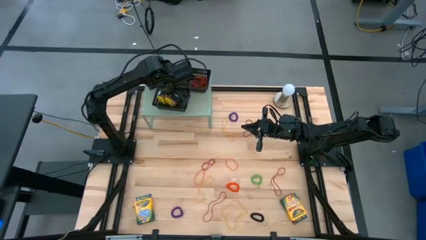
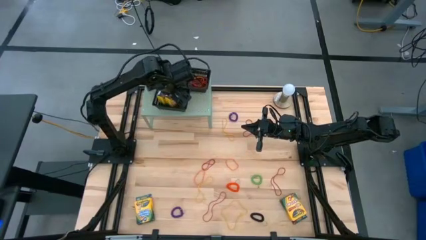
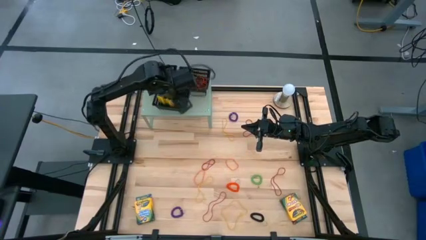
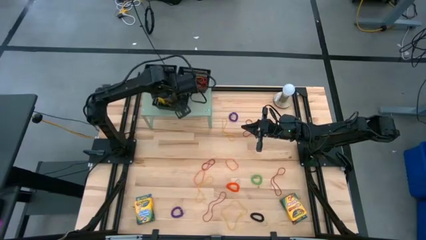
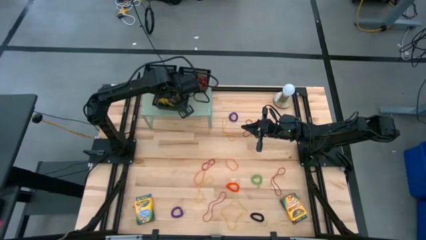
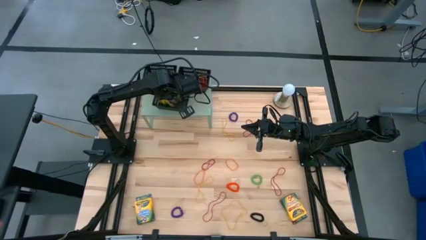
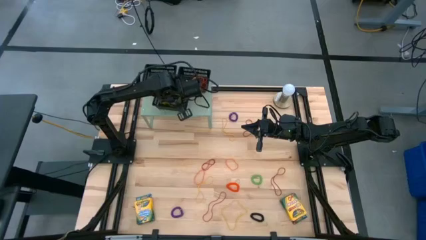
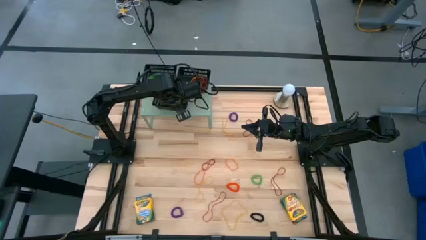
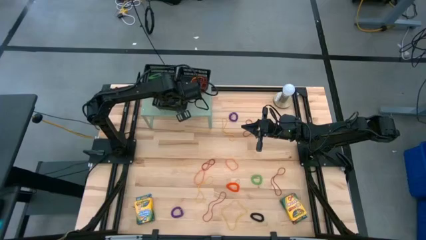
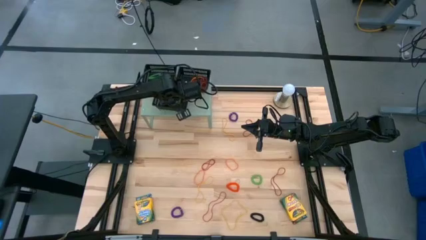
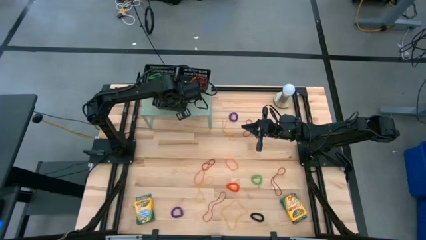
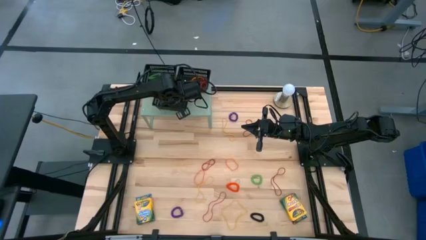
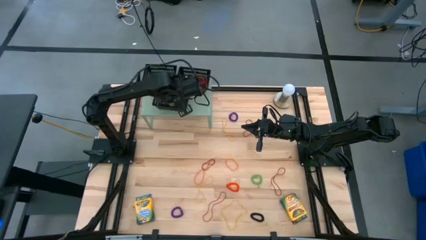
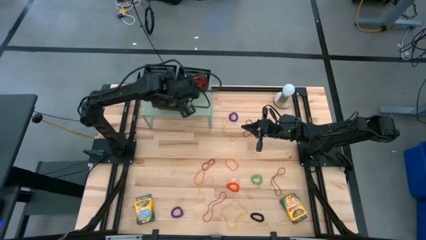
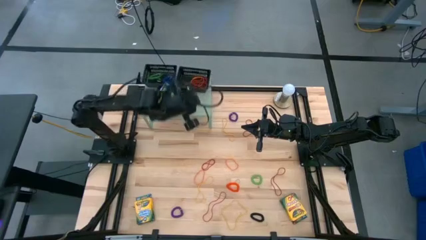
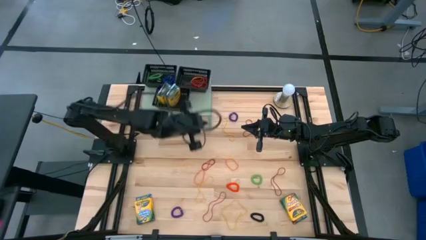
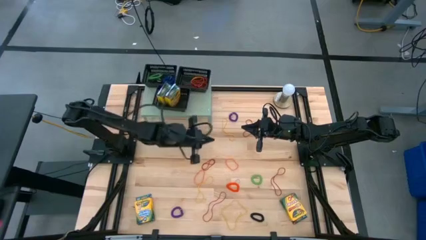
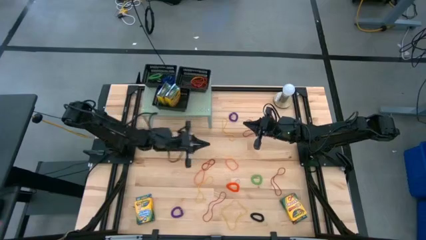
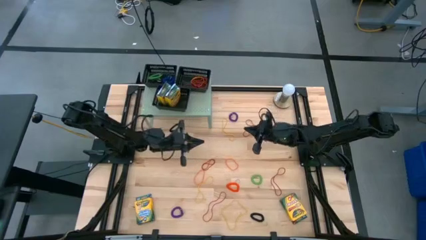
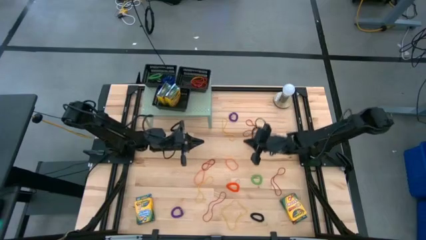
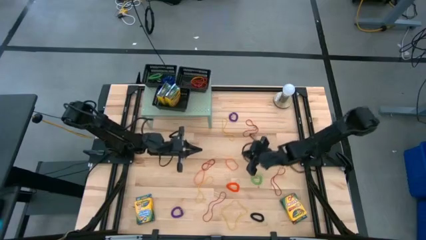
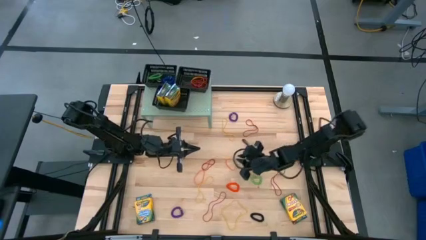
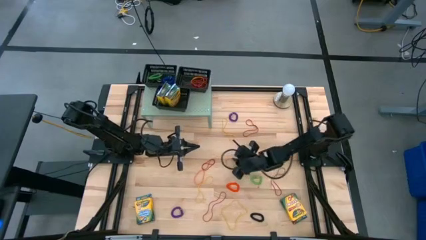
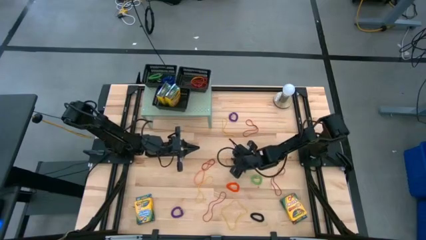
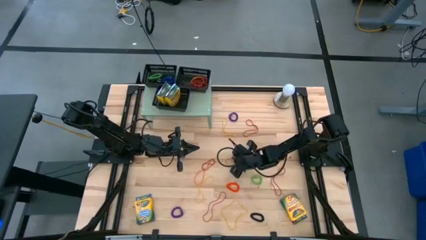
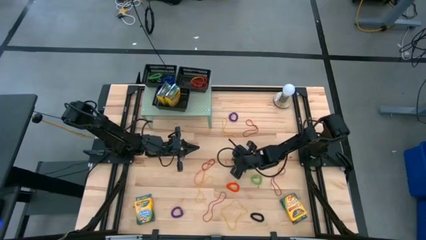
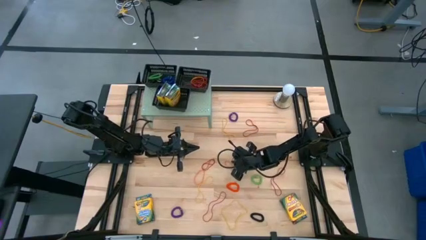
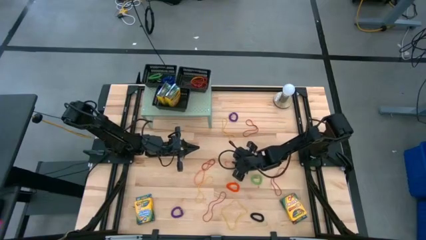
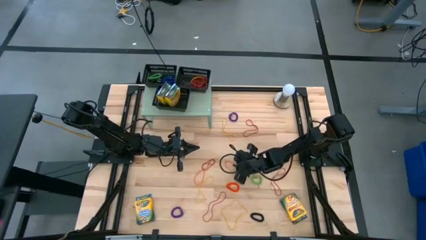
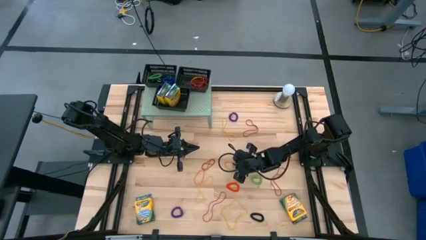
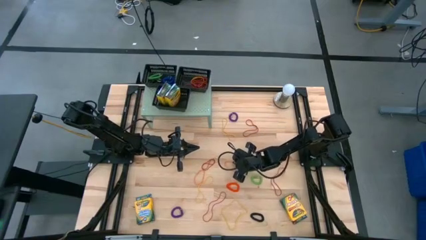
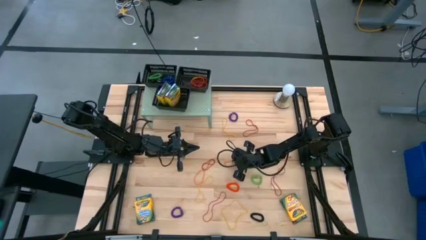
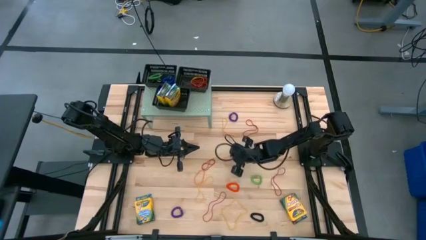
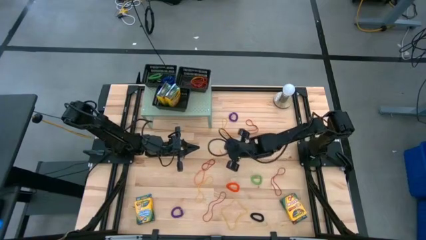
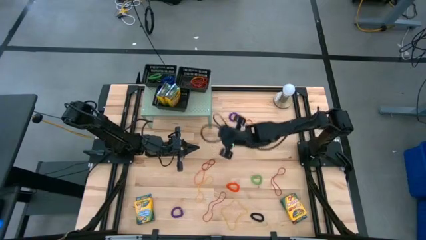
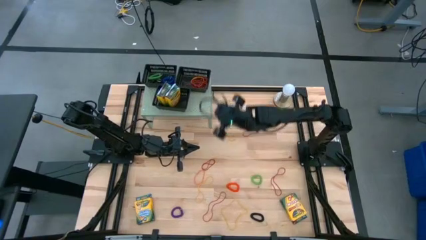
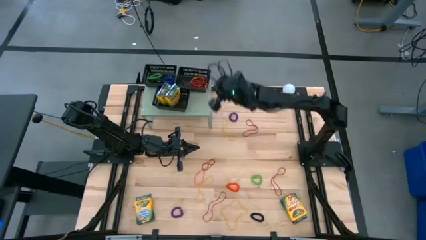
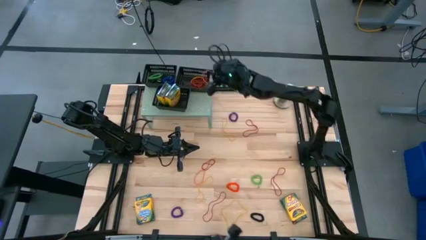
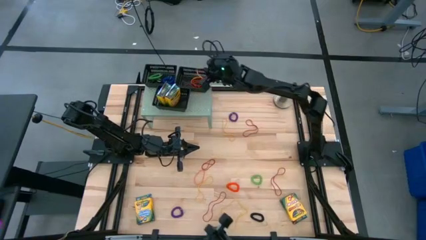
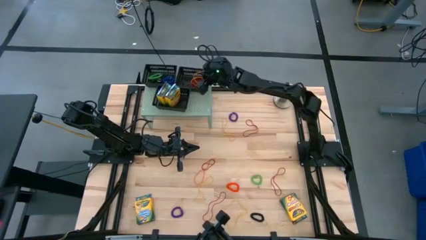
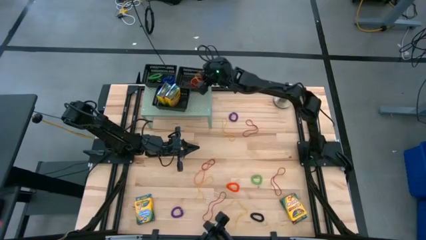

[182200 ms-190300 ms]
Task: Pick & Place Office Desk Supplies
Put the orange rubber band into the top right black bin

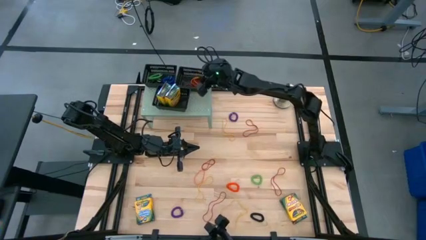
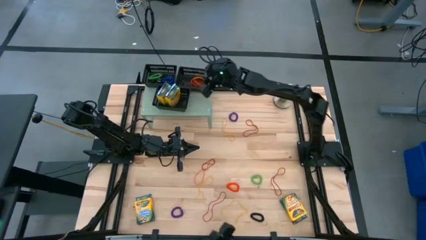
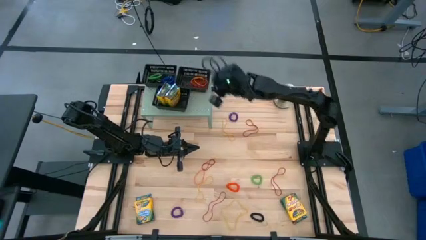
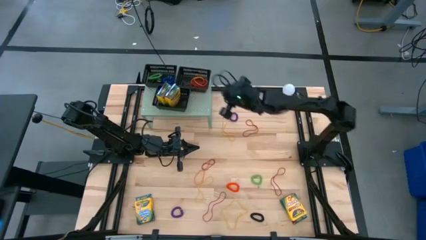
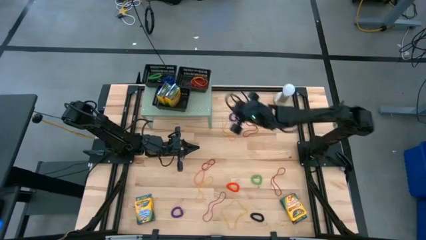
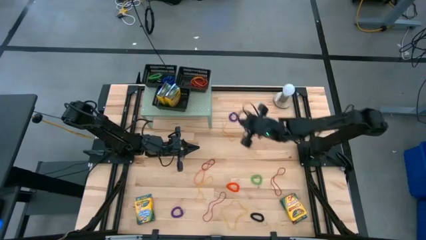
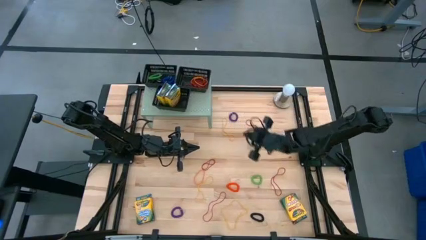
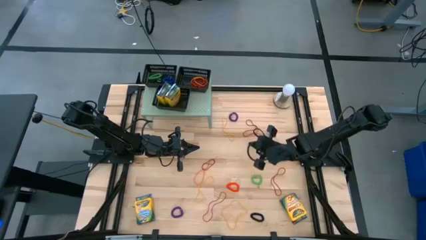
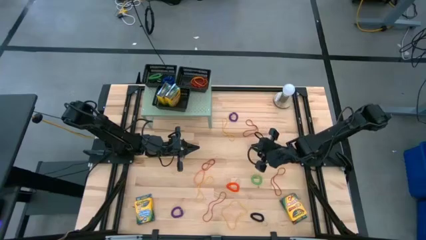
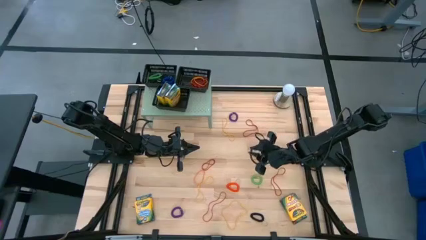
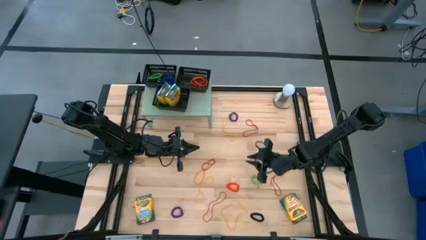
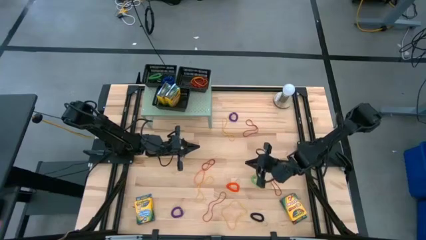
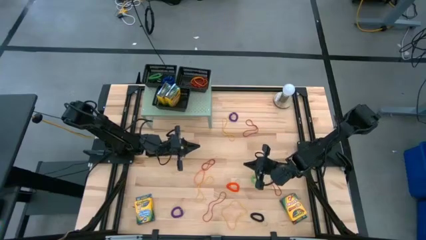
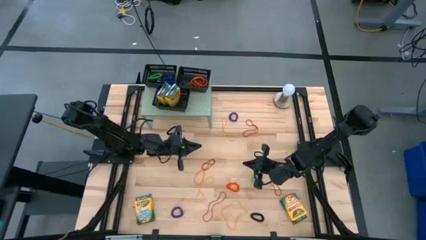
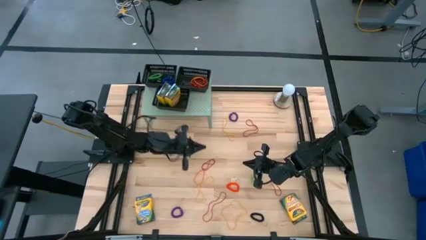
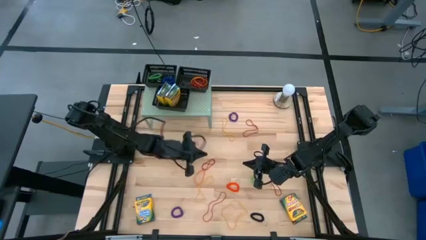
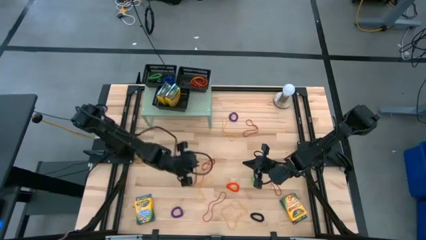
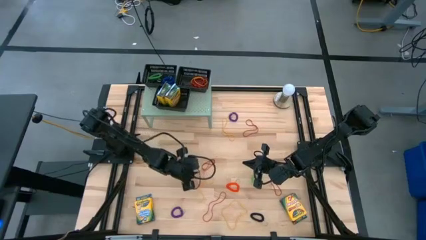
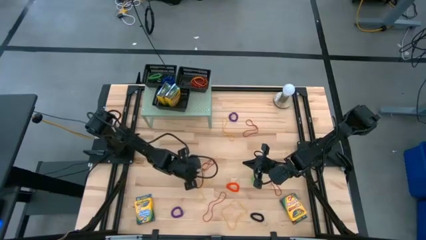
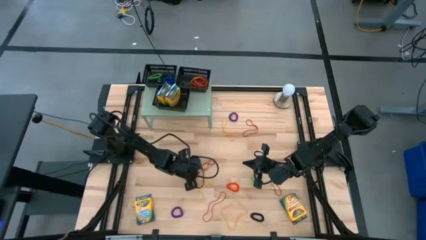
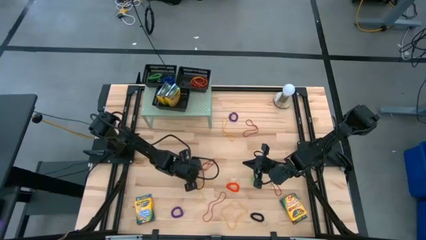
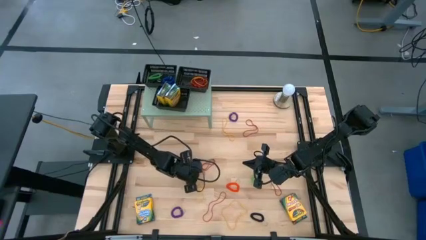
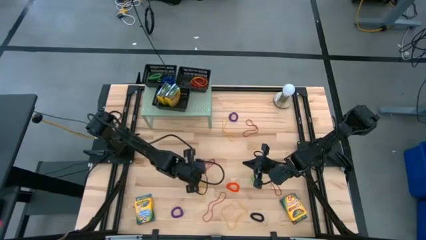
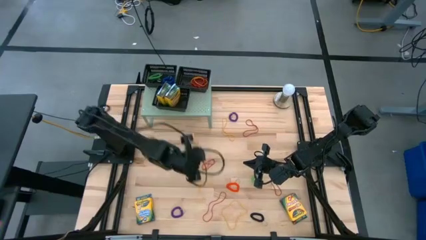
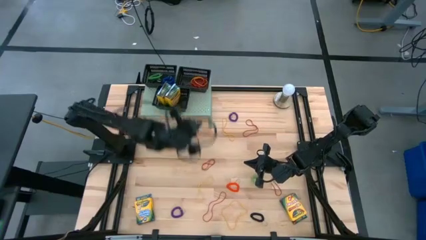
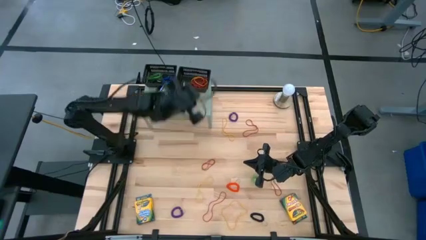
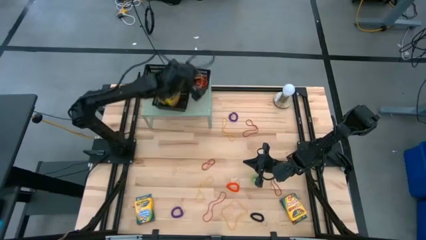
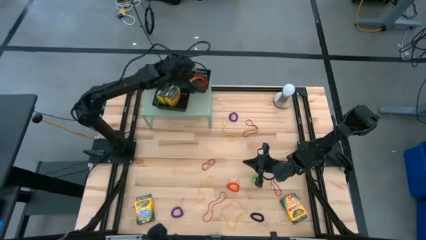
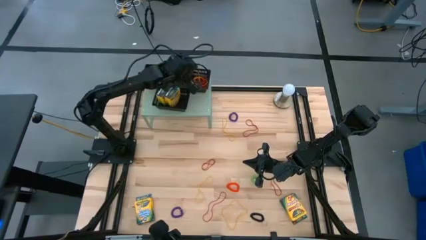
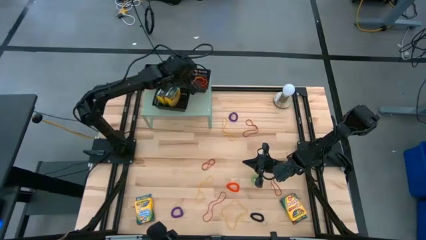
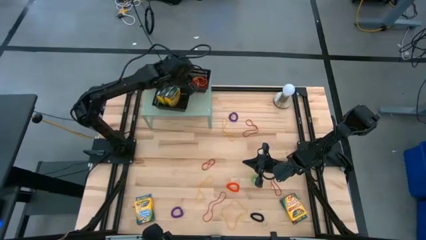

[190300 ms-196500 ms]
Put the orange rubber band into the top right black bin

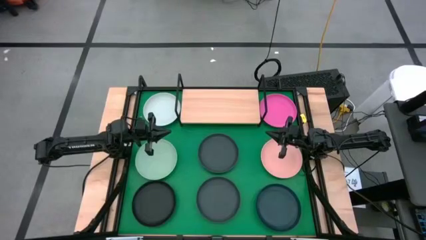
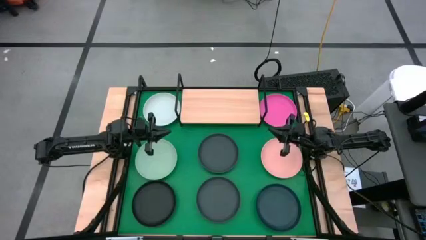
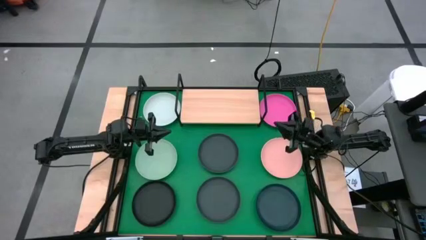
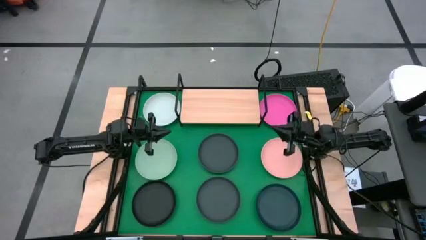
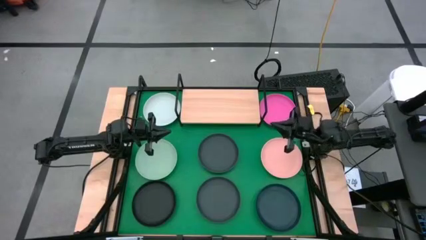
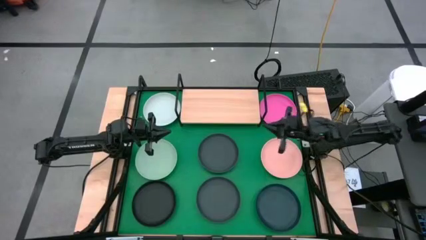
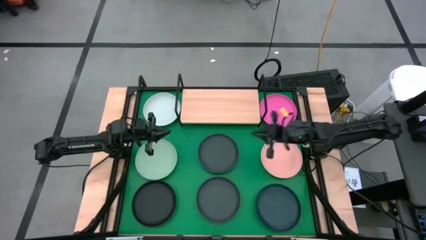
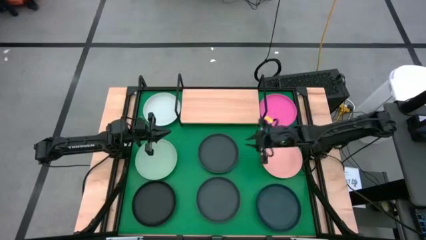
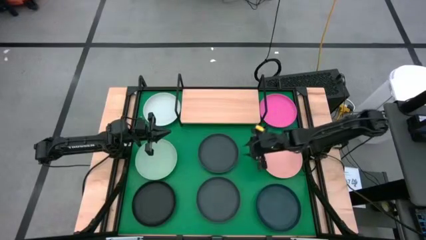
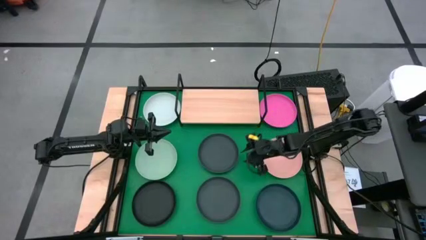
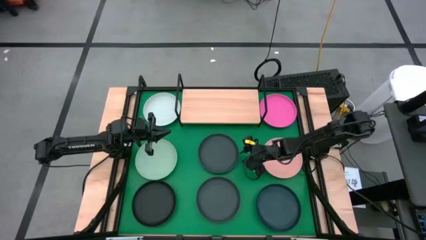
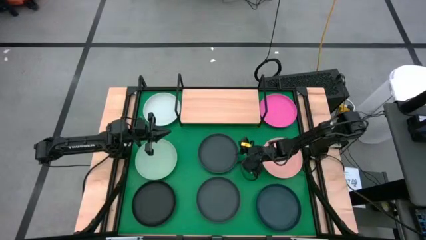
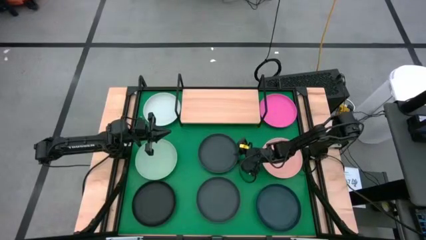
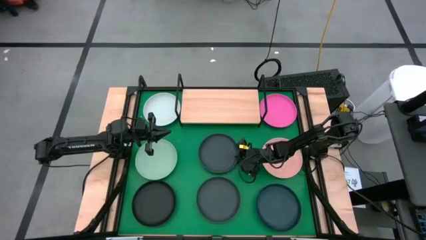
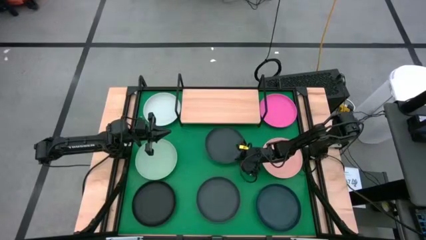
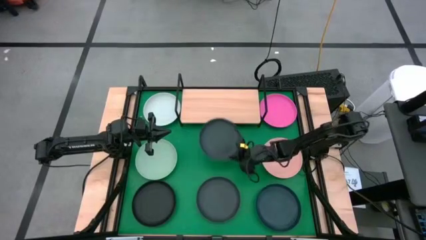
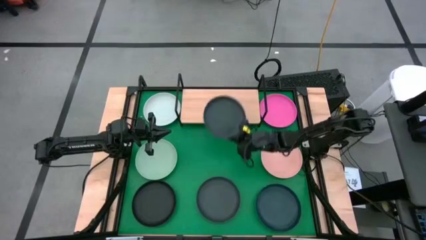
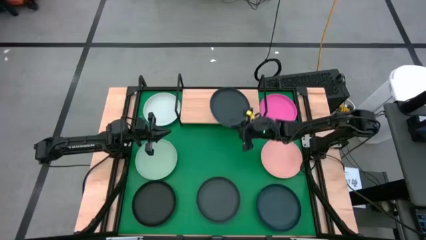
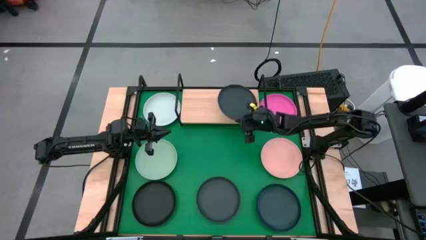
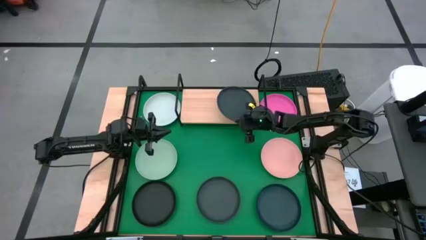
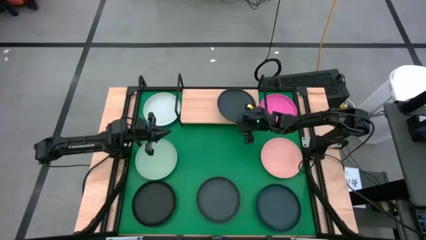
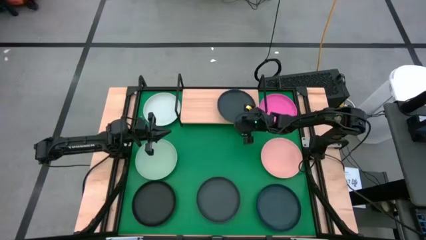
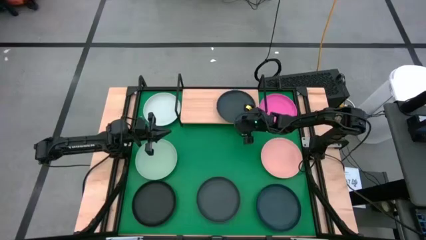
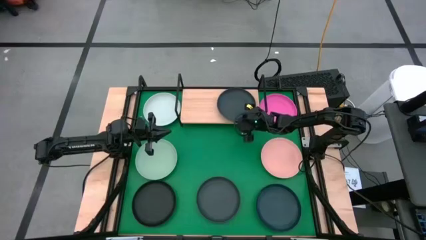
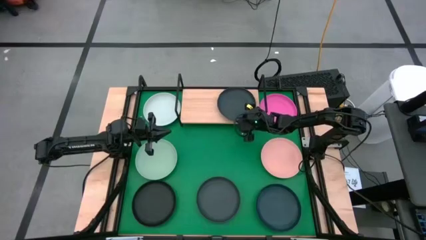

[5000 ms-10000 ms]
Task: Place and stack plates onto a shelf
Put the top black plate on the shelf
